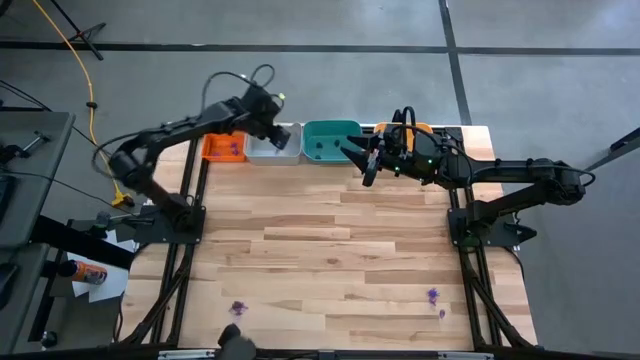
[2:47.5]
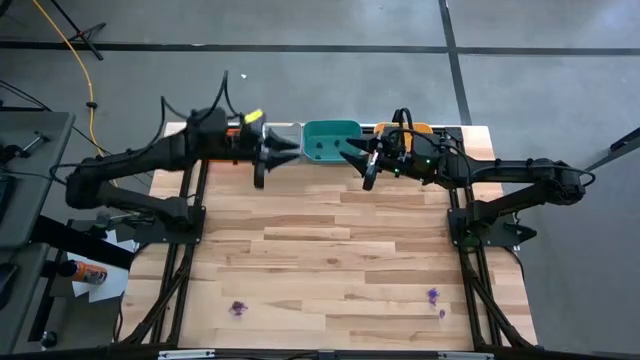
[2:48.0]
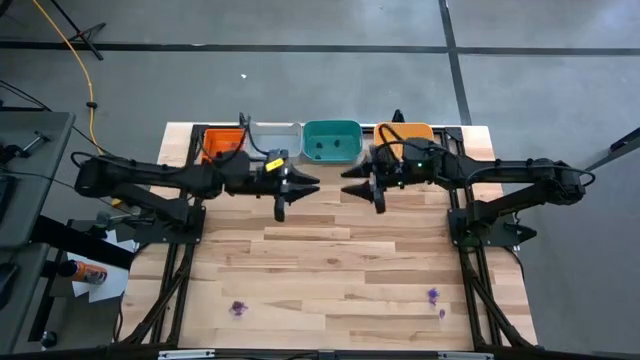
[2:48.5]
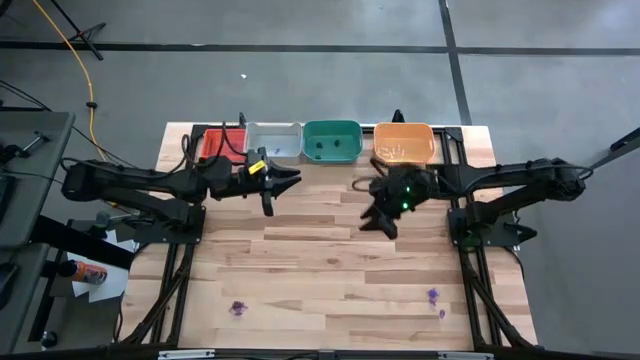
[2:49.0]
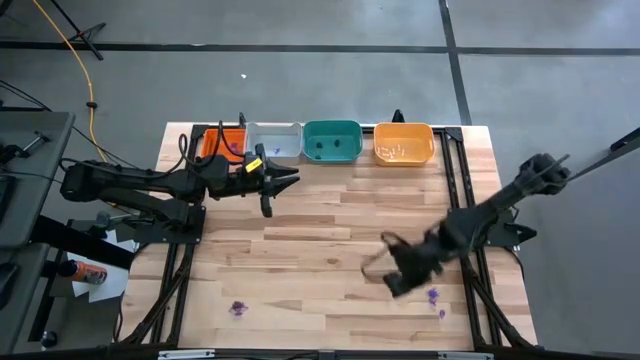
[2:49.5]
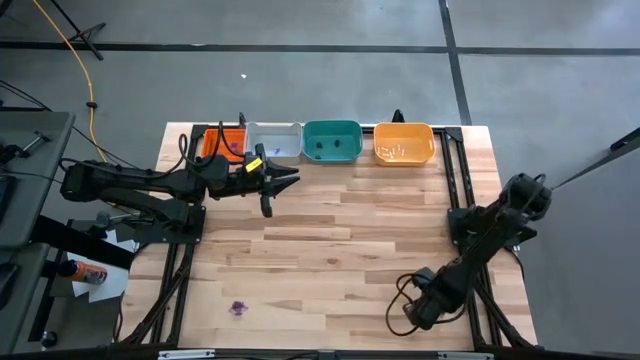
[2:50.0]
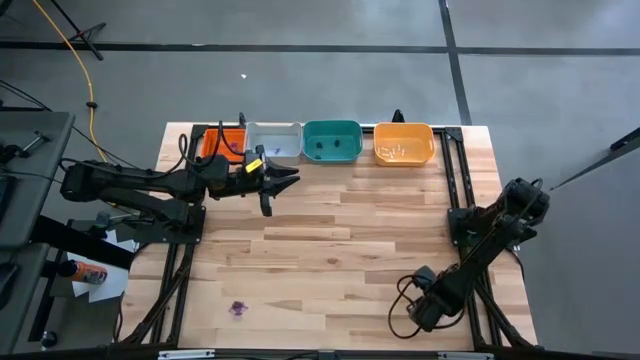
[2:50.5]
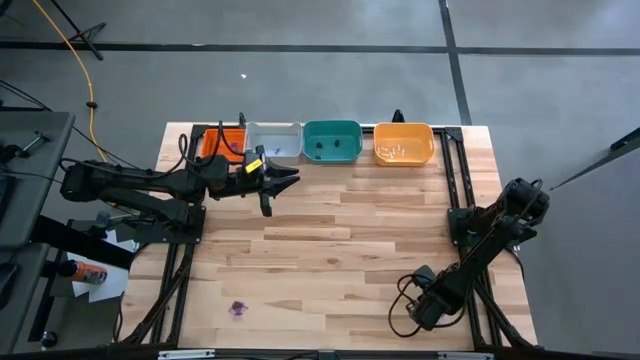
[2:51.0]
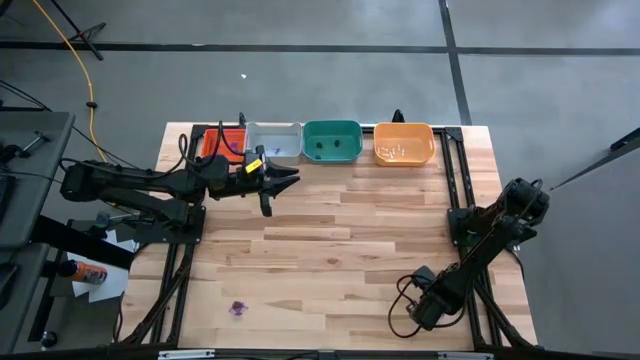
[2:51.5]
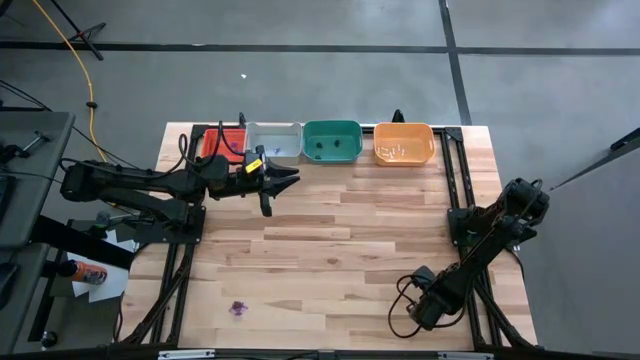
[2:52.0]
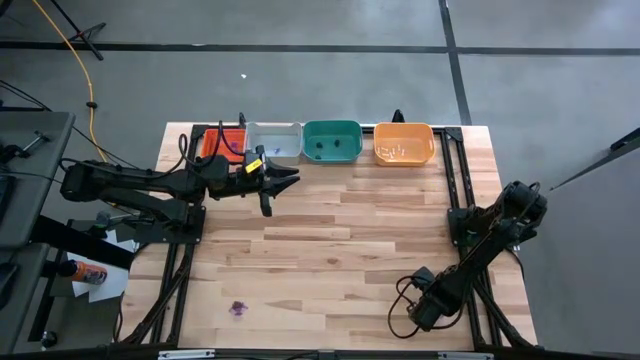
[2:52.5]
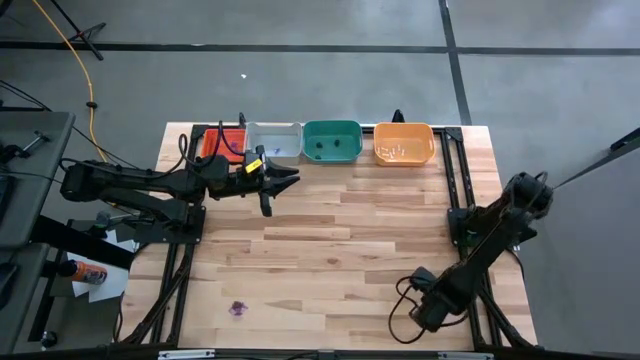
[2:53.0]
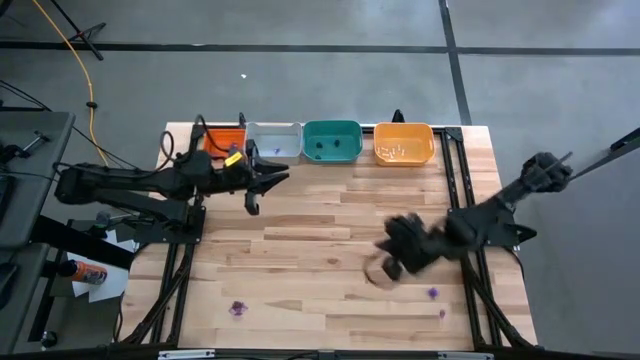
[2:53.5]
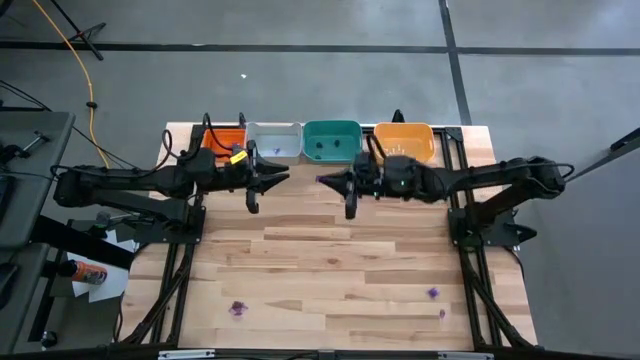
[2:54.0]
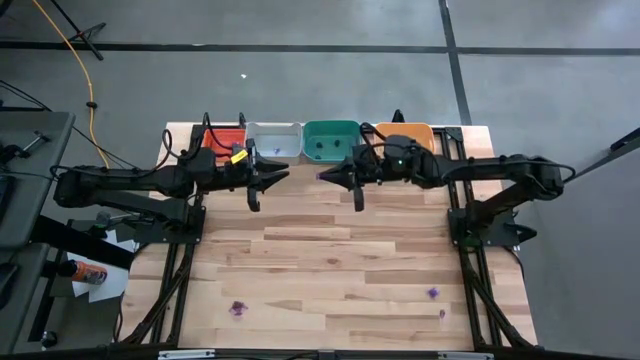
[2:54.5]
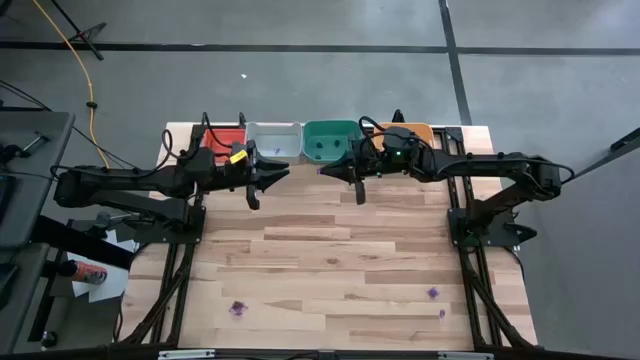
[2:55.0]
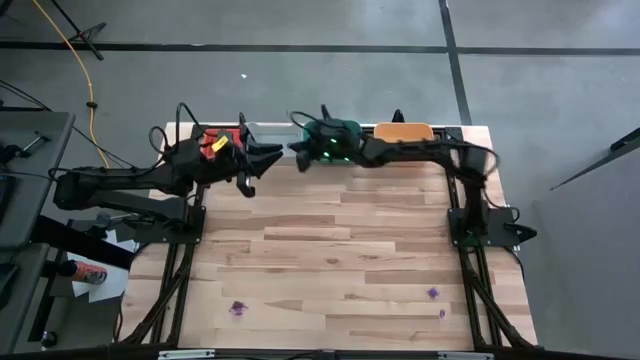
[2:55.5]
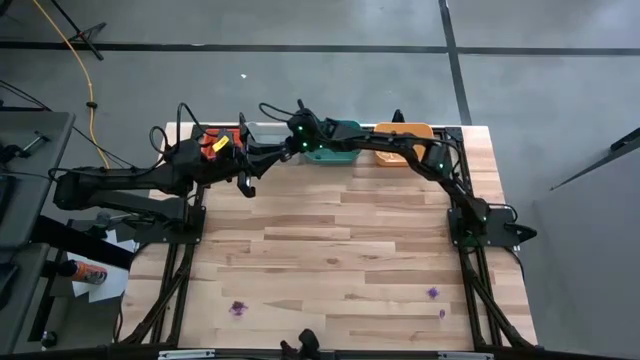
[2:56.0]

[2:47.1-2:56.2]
Task: Sort Halloween decoration
Put the violet witch hat into the gray bin

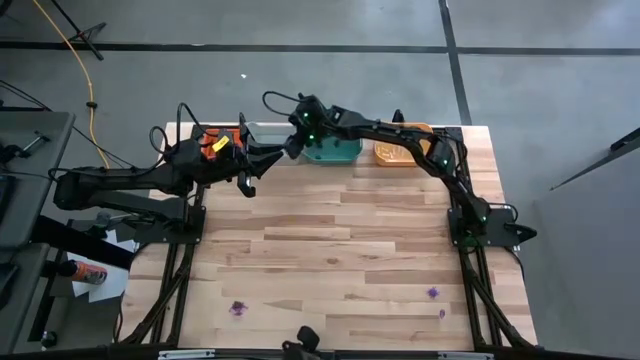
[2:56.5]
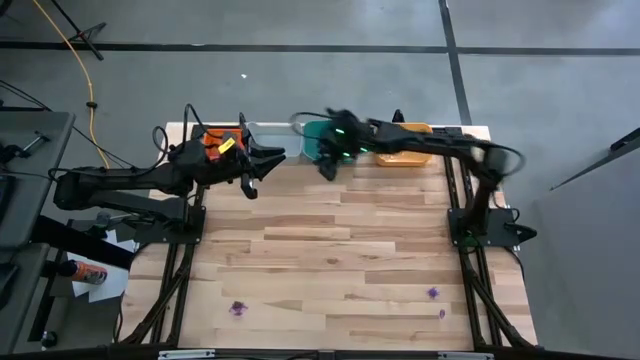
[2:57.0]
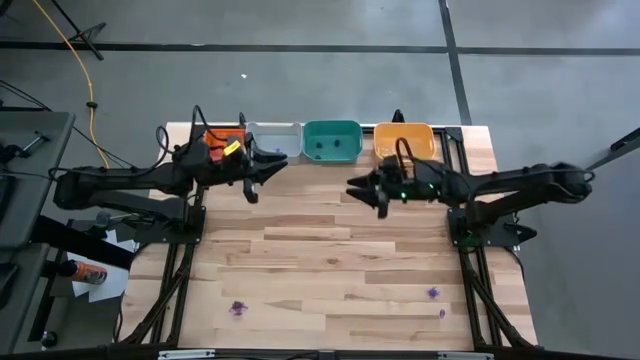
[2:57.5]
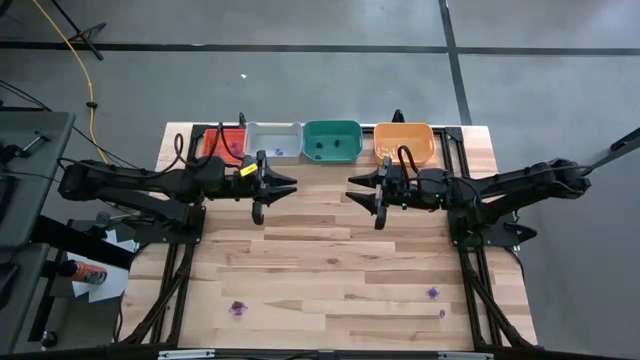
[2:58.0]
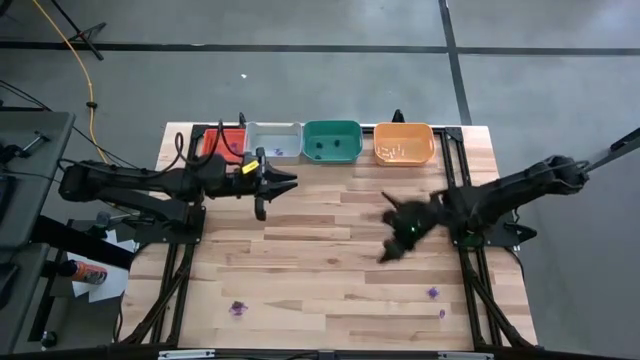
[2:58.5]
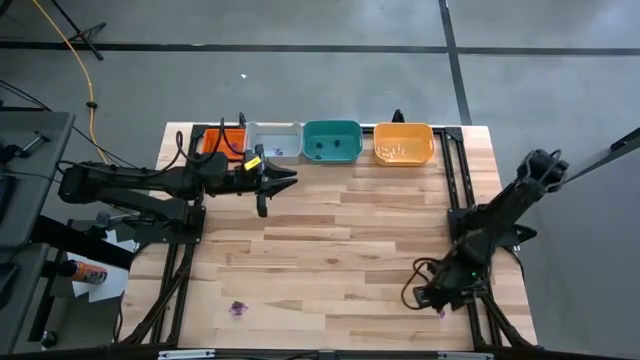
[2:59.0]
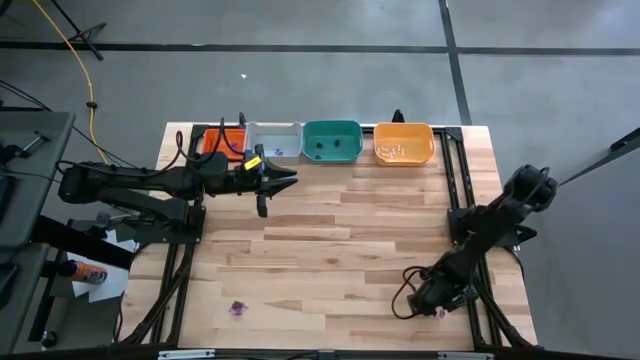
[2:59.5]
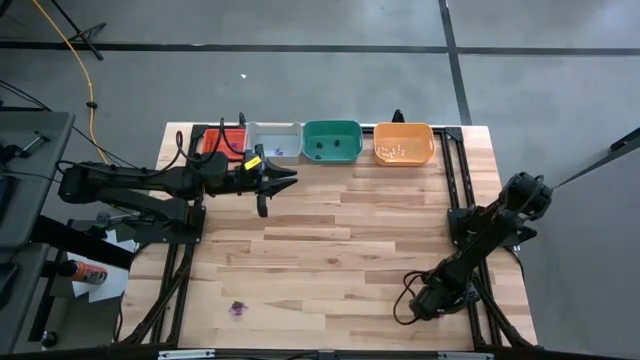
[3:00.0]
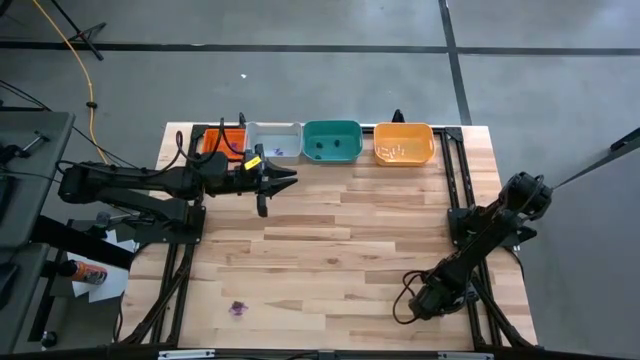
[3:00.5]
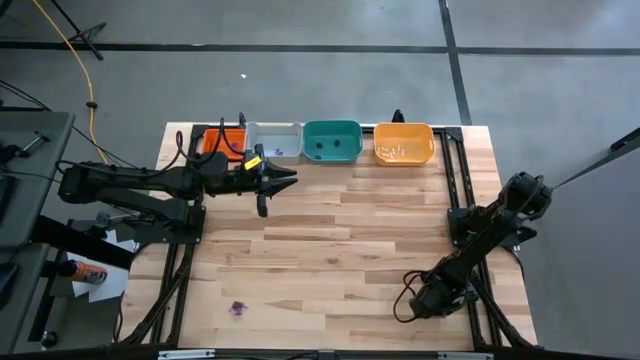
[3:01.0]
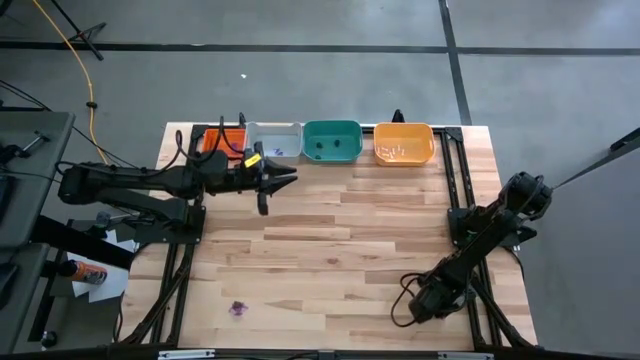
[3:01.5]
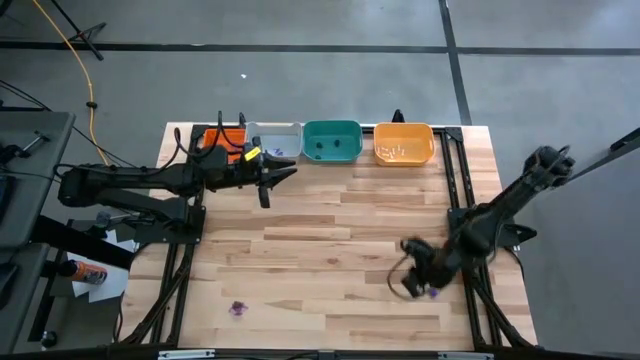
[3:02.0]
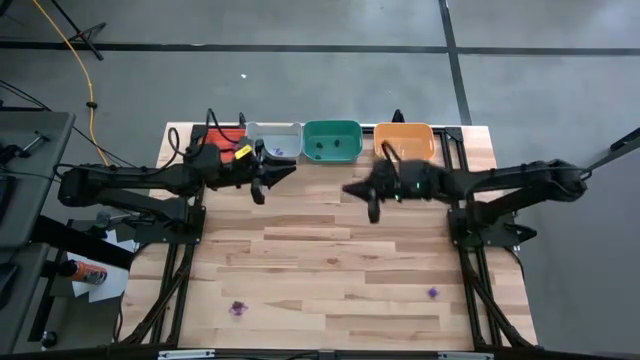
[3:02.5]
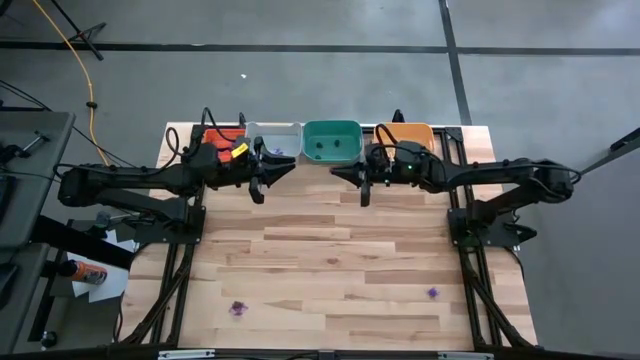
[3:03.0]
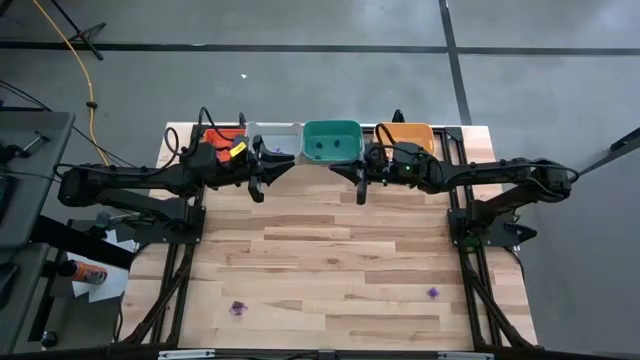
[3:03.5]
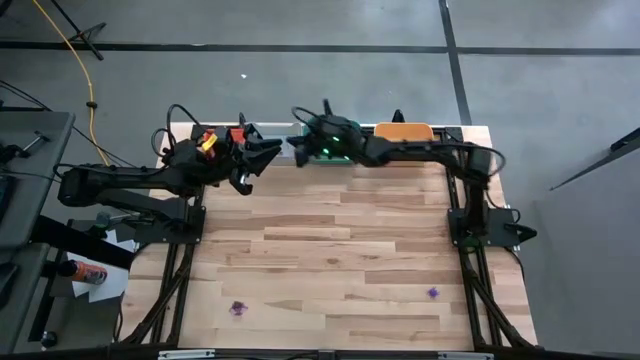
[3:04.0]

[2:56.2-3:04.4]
Put the violet witch hat into the gray bin

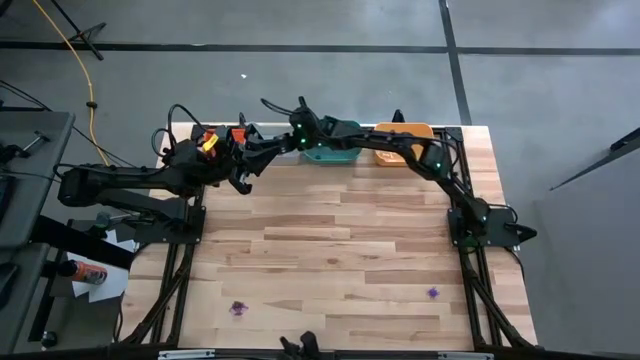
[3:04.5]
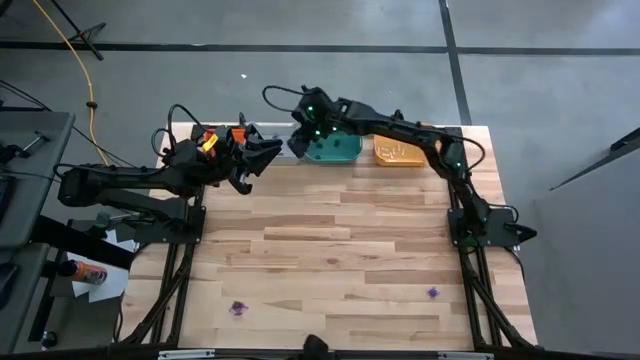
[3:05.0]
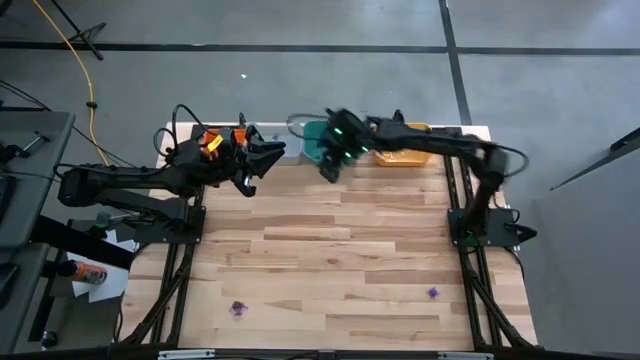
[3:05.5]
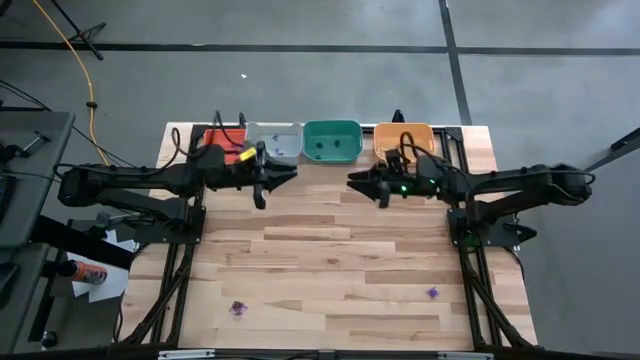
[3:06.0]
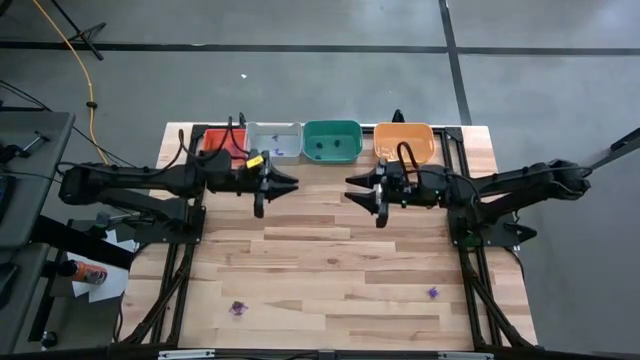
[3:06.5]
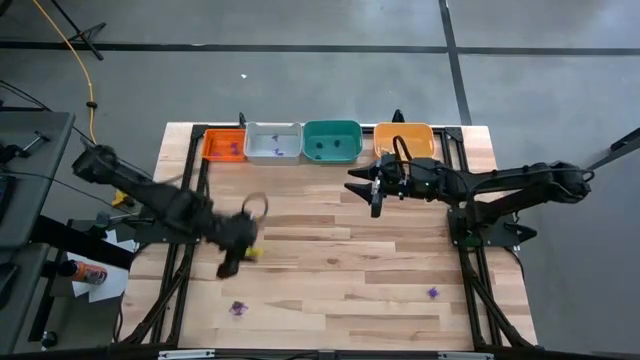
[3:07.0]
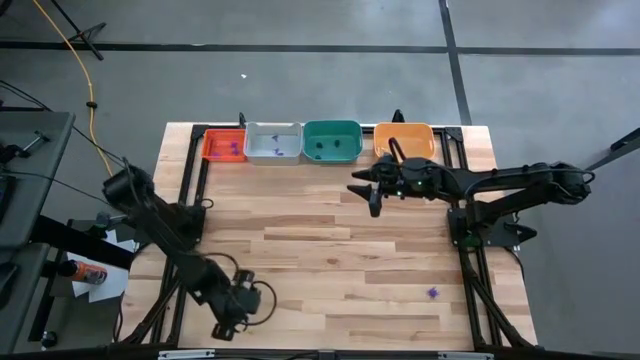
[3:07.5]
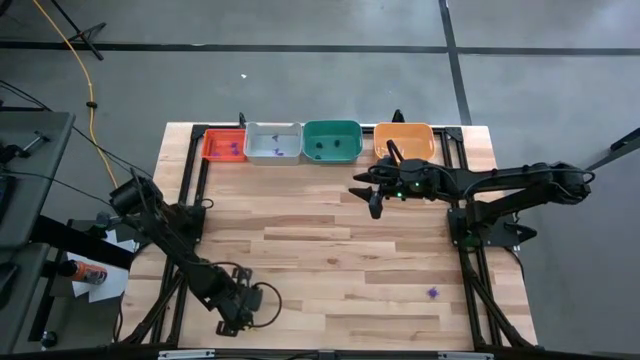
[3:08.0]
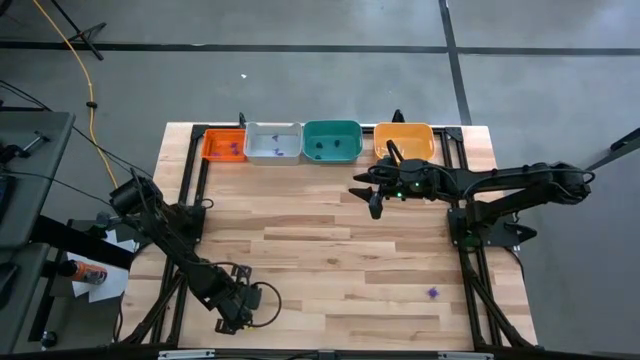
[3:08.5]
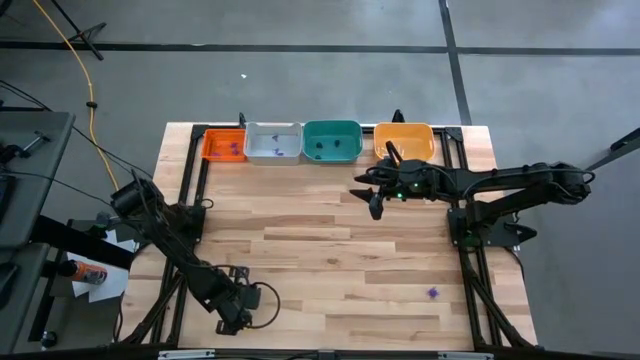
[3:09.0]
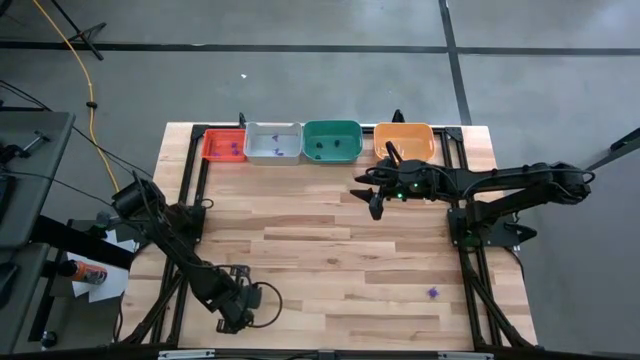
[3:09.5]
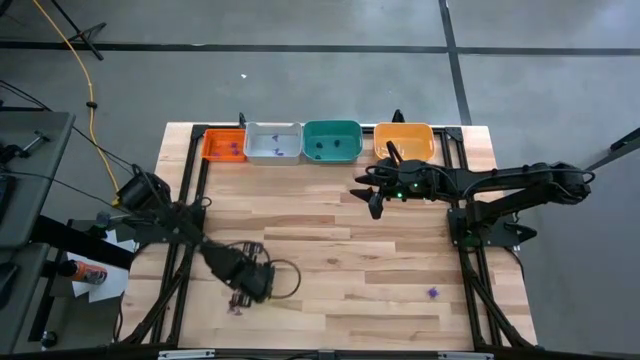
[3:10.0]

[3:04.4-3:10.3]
Put the violet witch hat into the gray bin
